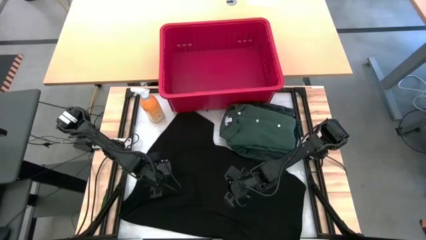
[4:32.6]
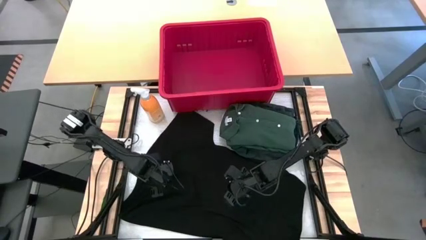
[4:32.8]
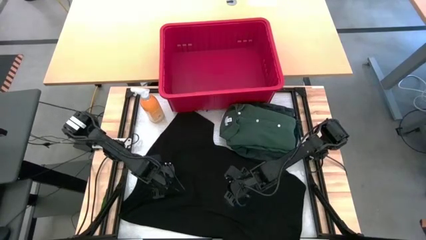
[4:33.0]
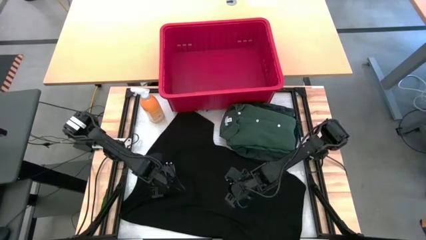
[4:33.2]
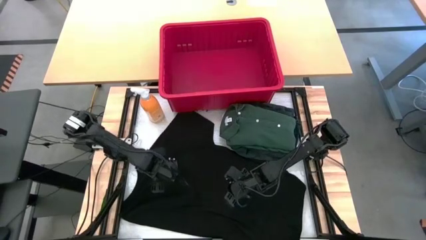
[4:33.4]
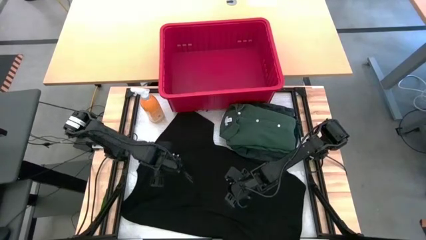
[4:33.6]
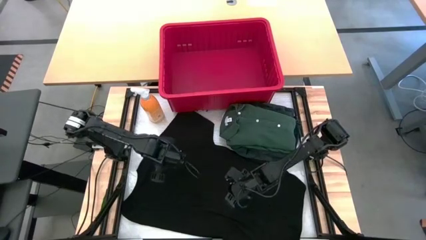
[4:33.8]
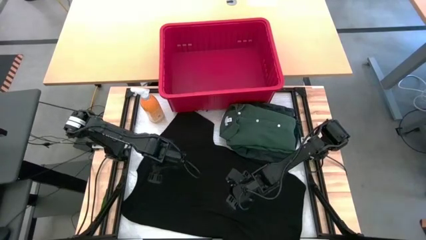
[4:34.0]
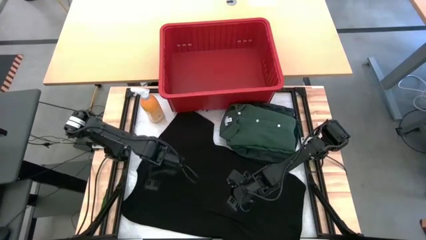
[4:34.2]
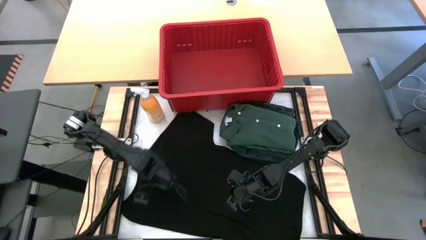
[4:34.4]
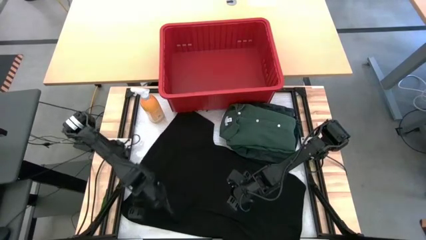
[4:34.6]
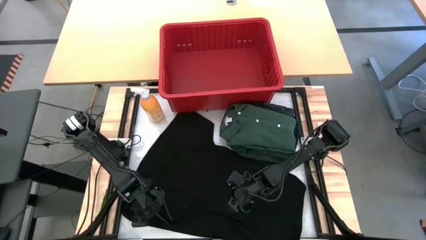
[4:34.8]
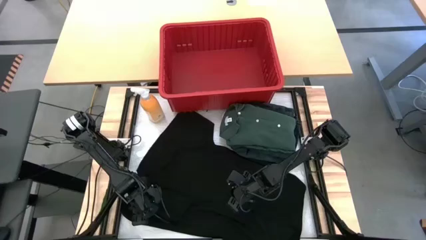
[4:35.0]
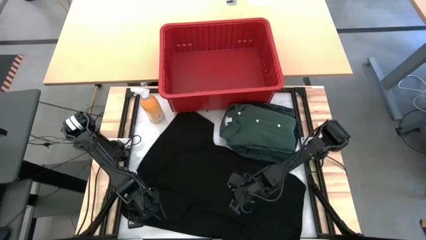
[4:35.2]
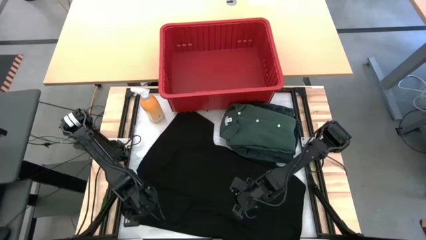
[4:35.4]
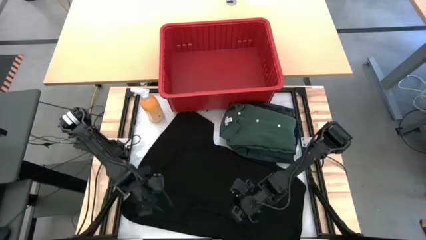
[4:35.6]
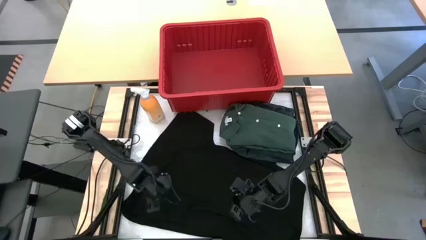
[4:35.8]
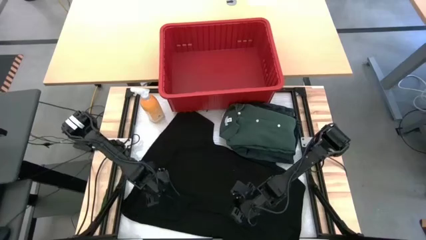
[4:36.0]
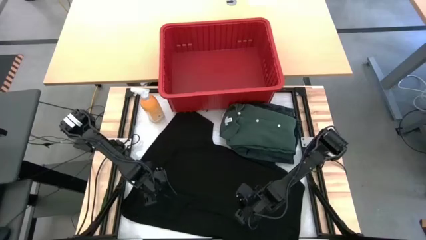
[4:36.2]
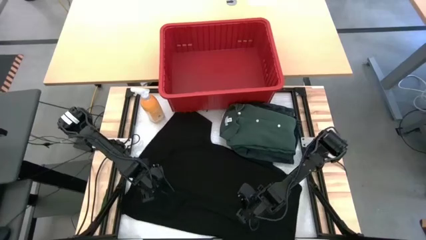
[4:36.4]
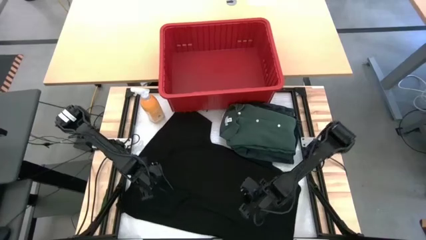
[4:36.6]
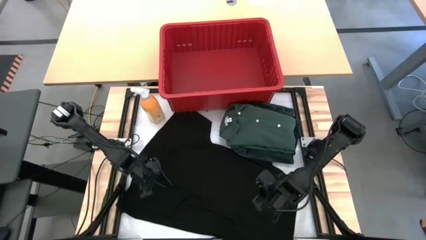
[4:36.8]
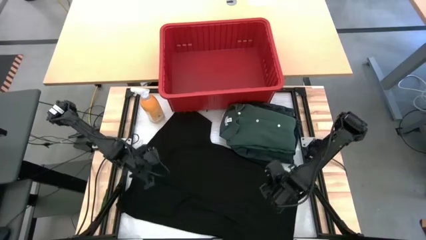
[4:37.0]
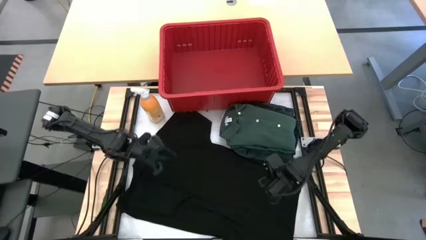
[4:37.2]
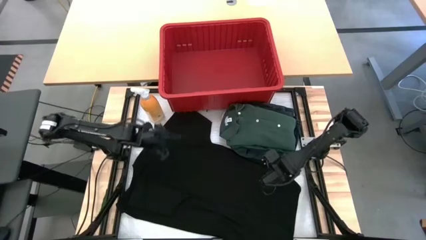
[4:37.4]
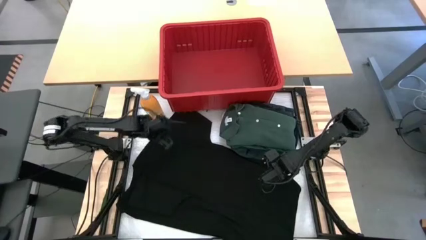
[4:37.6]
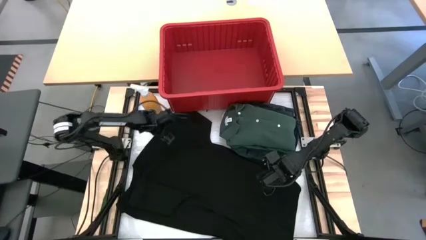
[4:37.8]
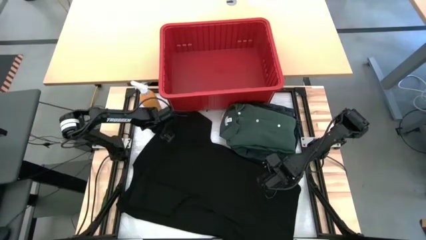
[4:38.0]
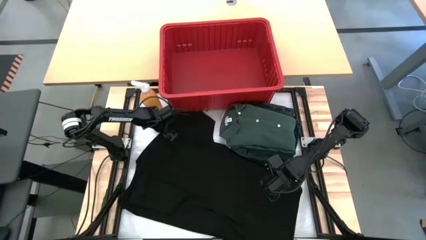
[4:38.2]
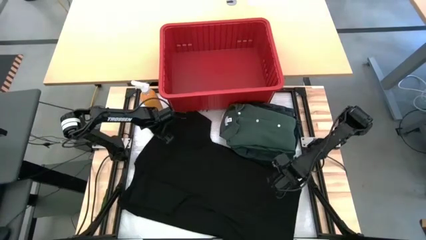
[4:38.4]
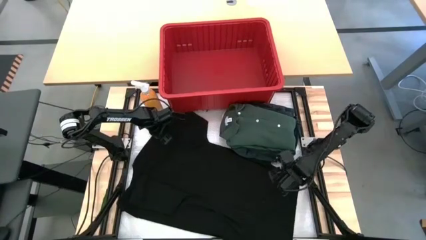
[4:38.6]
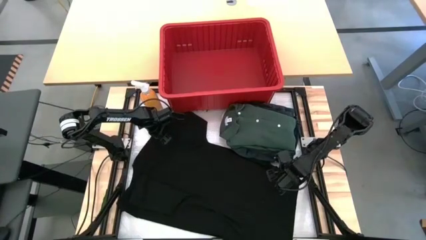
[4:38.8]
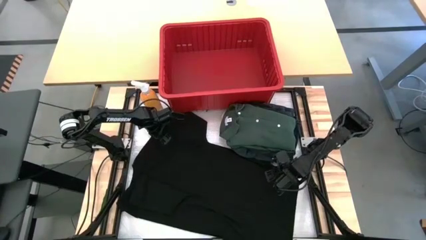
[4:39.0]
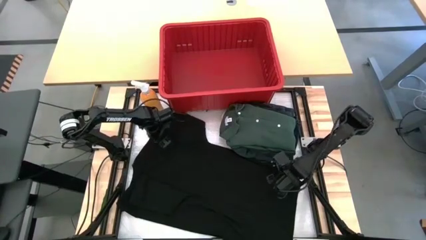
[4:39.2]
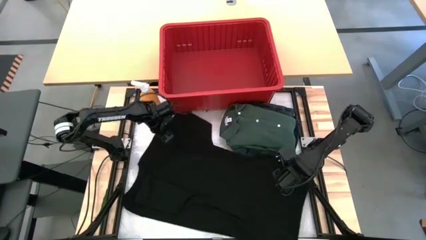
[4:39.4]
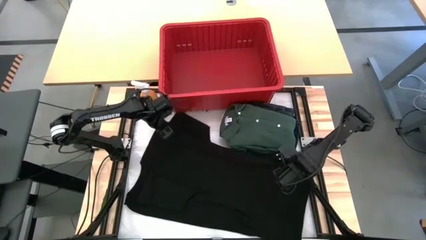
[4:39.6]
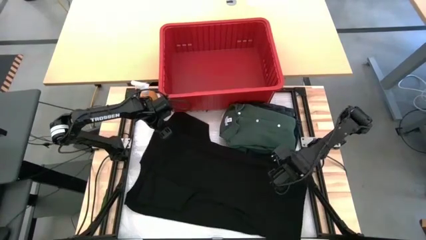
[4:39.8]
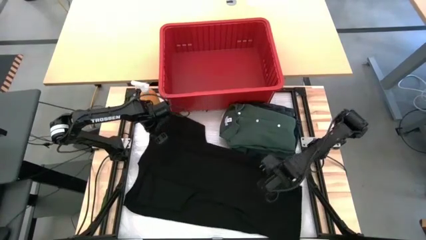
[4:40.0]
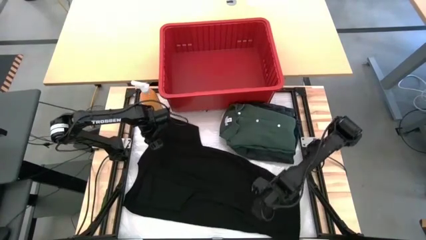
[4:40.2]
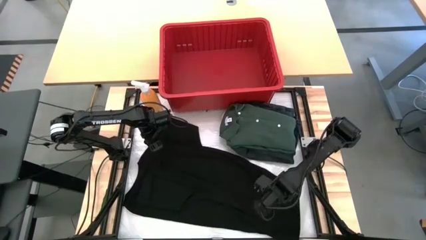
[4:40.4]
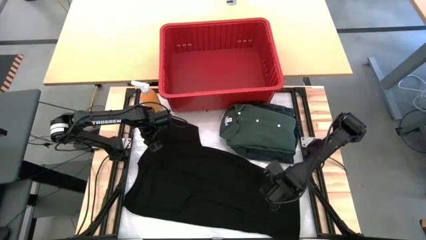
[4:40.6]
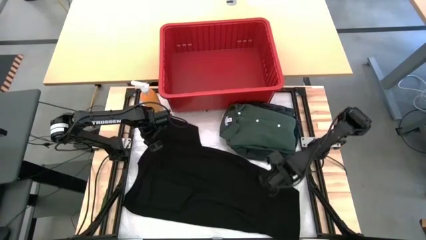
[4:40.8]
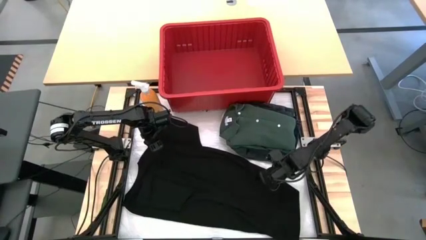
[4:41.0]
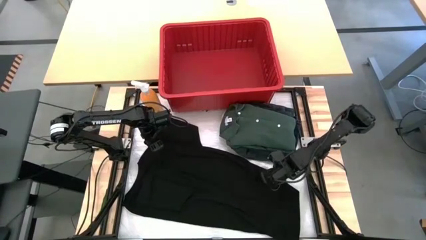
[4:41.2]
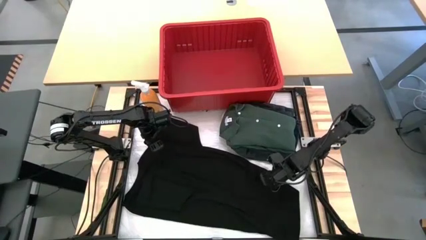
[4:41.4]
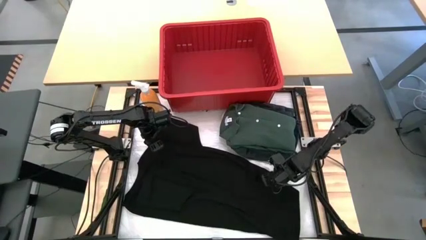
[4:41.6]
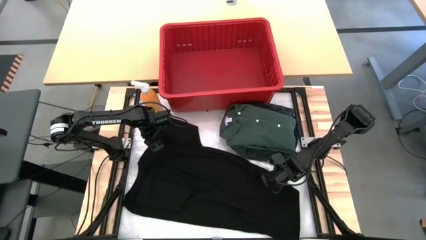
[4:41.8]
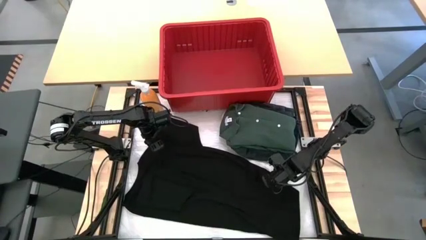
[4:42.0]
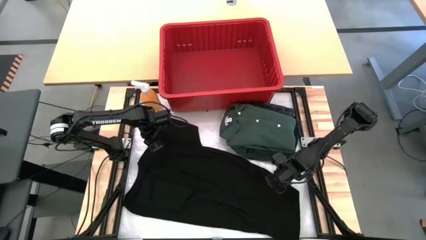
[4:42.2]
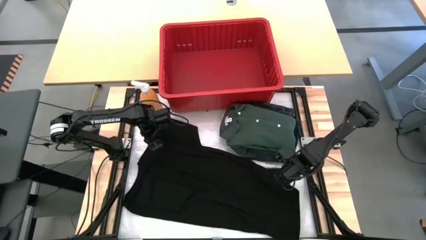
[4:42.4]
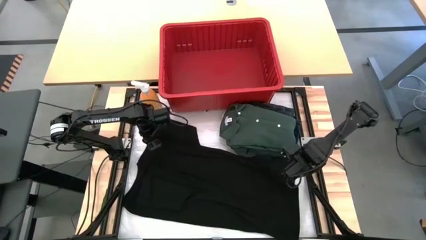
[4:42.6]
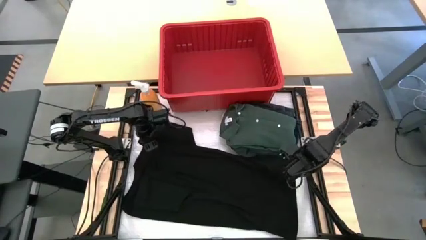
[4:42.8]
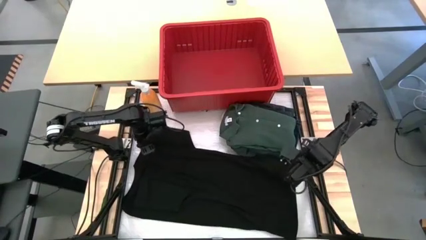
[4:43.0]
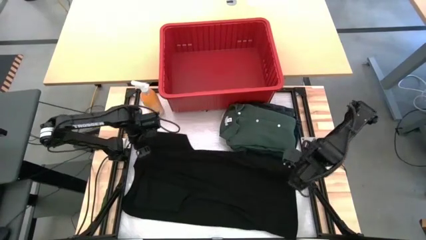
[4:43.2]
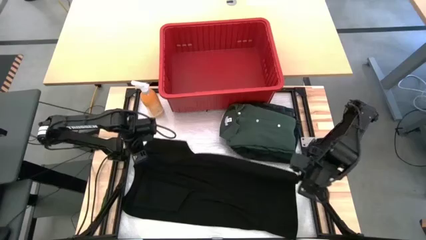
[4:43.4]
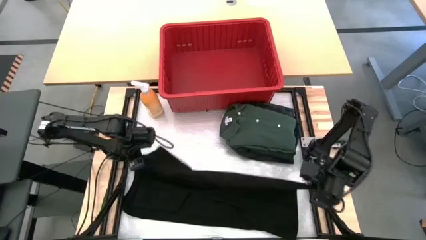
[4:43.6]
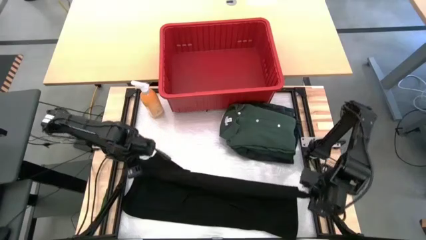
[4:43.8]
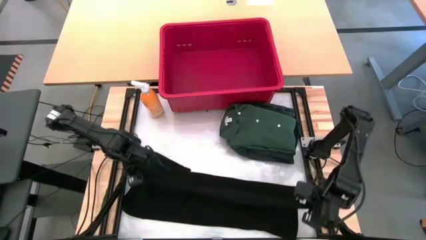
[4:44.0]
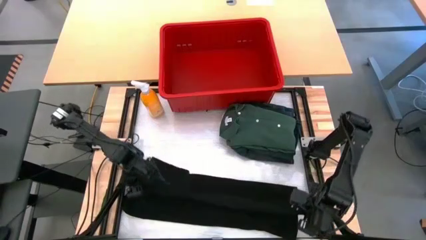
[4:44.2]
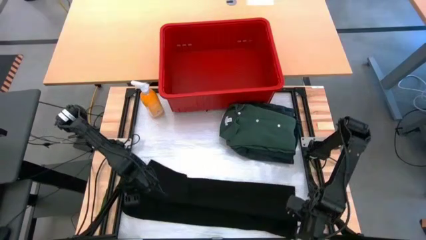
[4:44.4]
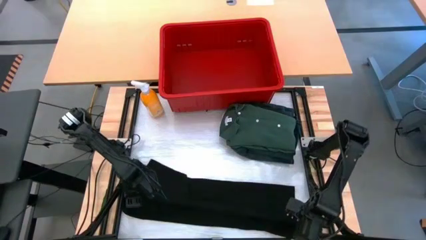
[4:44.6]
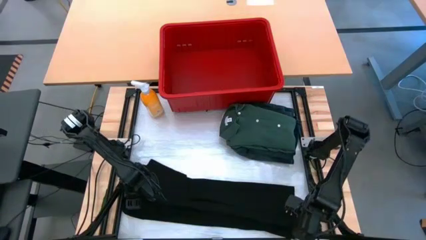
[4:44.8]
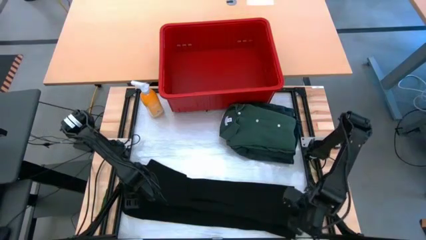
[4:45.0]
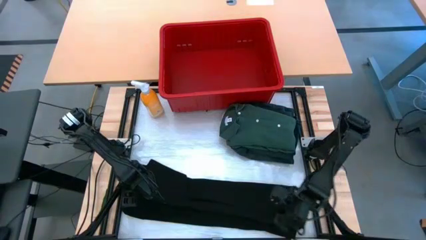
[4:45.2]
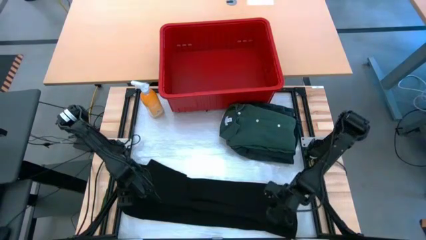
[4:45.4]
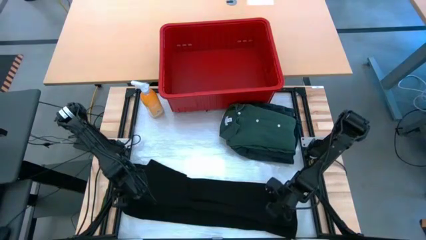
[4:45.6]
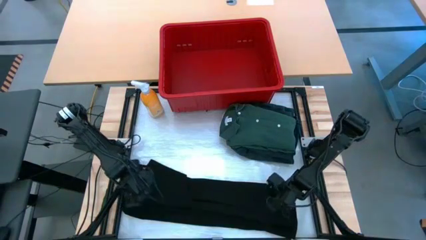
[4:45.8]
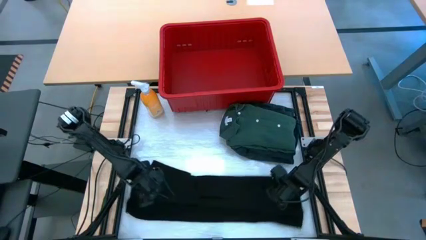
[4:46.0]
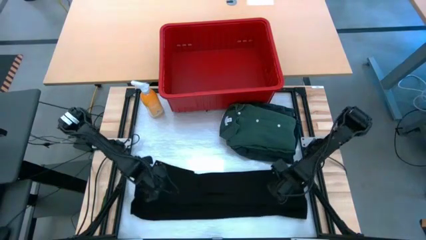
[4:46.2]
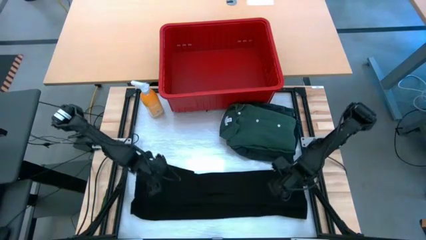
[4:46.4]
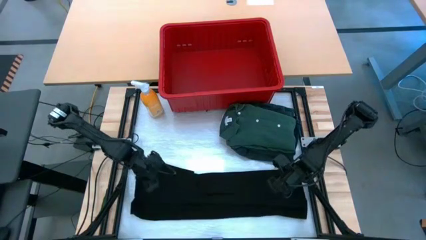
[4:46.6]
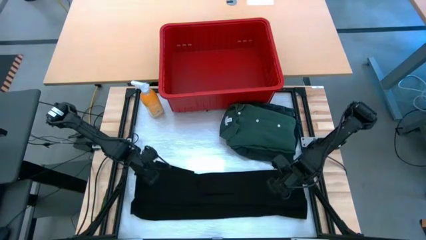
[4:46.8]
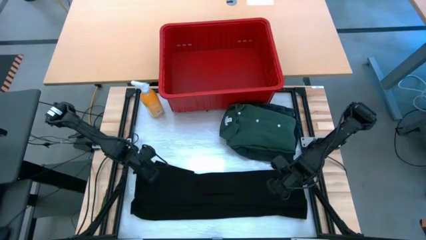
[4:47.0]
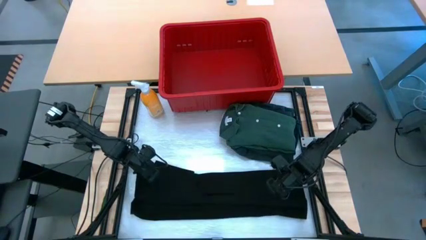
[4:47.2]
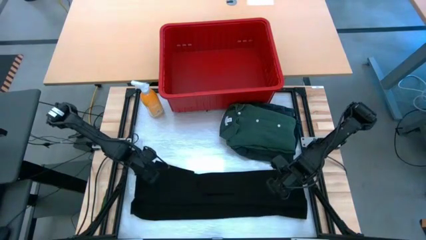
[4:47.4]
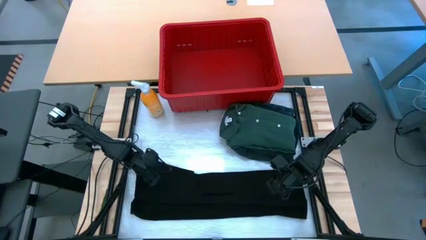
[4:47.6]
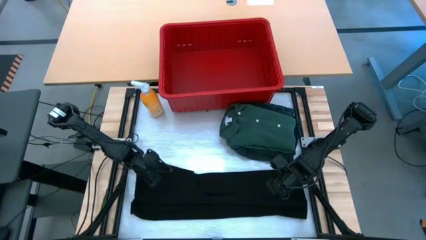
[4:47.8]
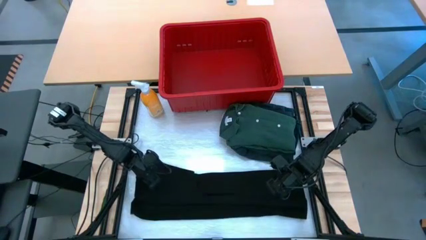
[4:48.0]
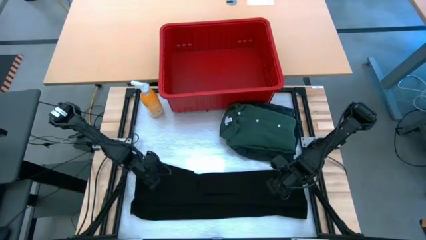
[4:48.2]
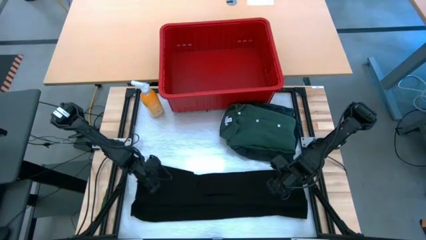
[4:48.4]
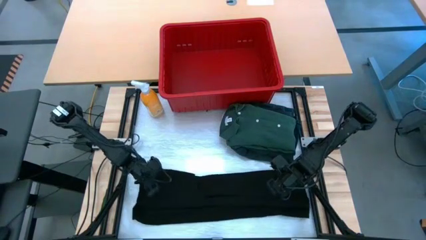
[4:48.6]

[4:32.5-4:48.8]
Task: Fold laundry
Fold the black shirt
